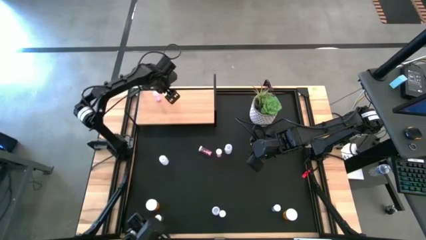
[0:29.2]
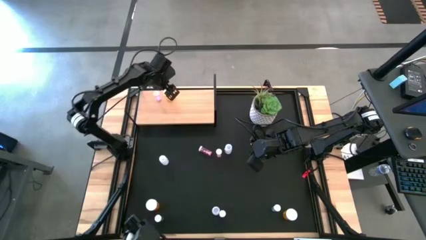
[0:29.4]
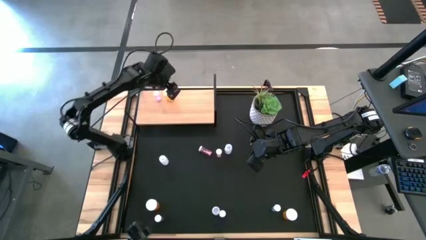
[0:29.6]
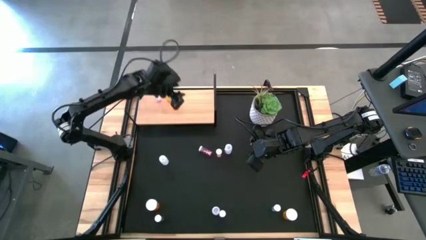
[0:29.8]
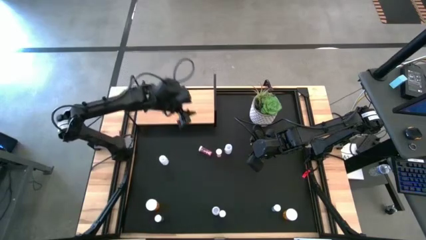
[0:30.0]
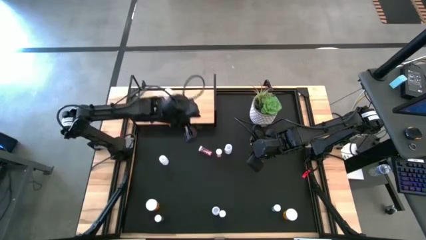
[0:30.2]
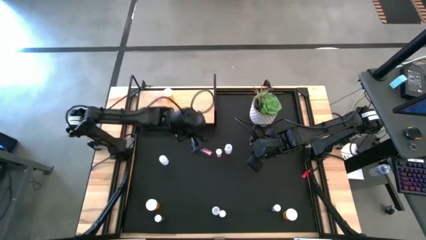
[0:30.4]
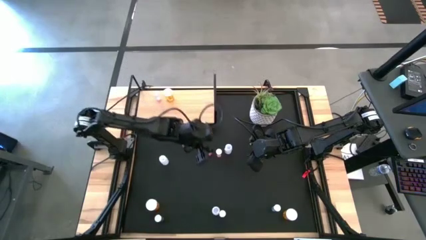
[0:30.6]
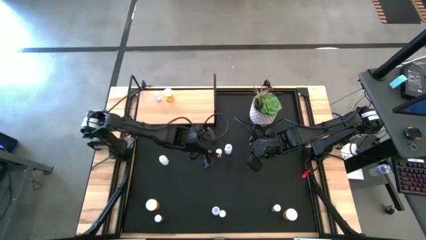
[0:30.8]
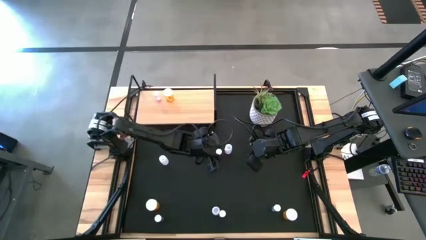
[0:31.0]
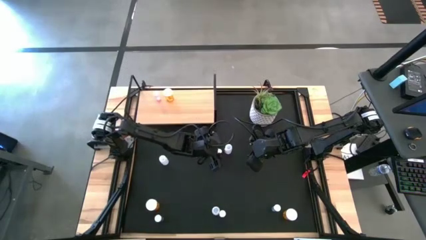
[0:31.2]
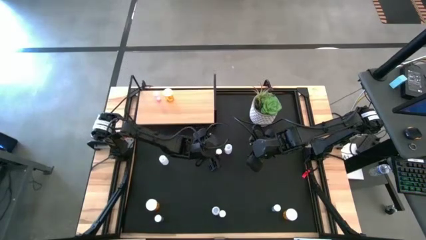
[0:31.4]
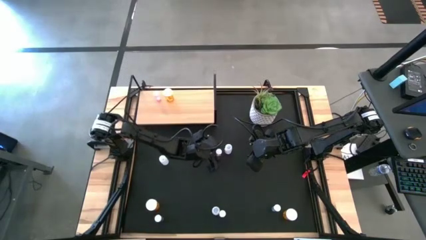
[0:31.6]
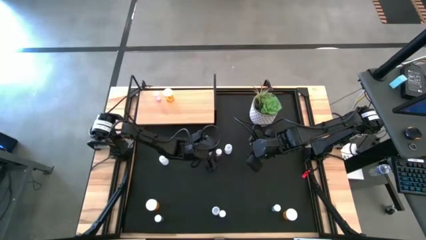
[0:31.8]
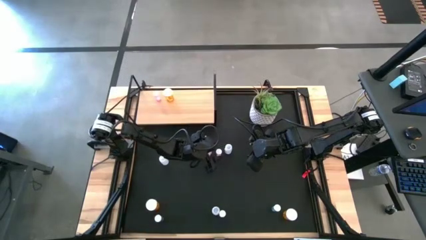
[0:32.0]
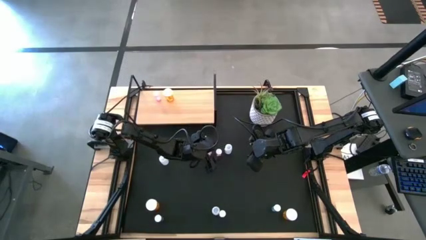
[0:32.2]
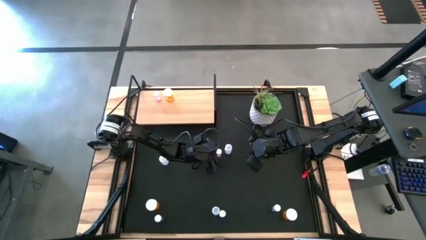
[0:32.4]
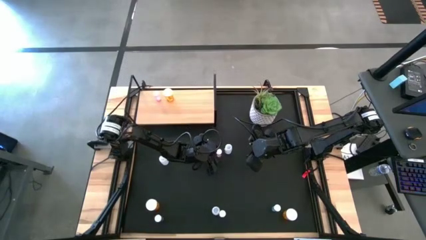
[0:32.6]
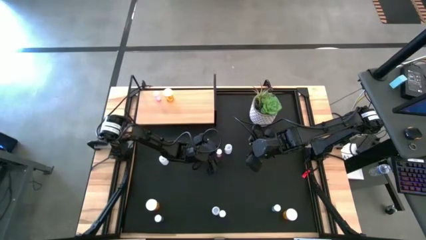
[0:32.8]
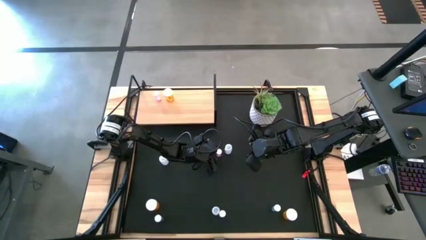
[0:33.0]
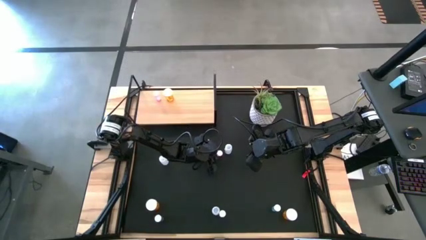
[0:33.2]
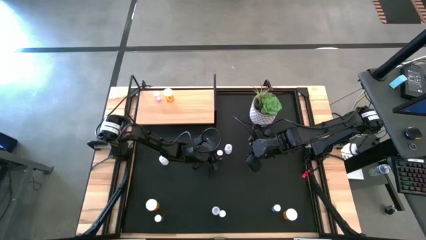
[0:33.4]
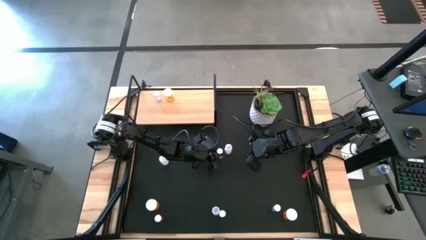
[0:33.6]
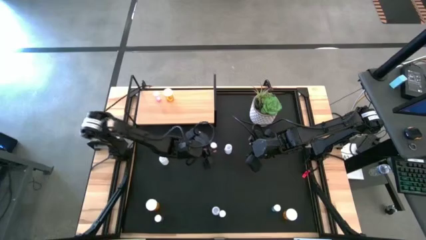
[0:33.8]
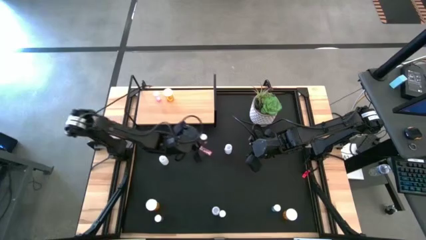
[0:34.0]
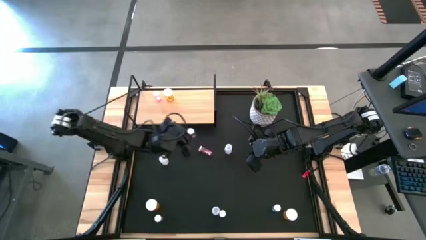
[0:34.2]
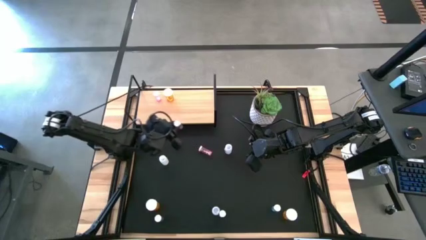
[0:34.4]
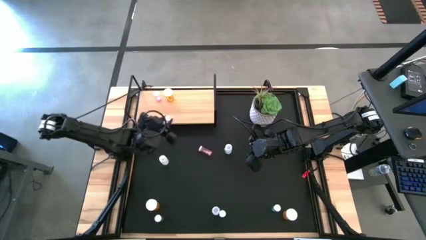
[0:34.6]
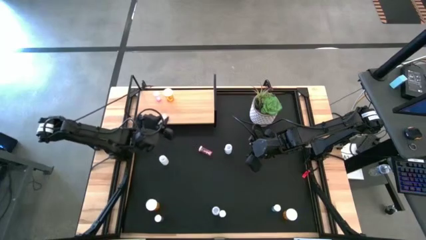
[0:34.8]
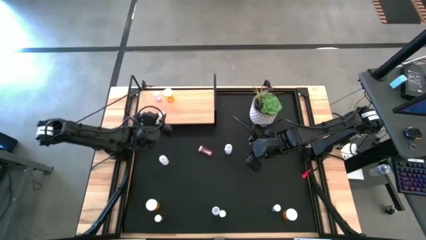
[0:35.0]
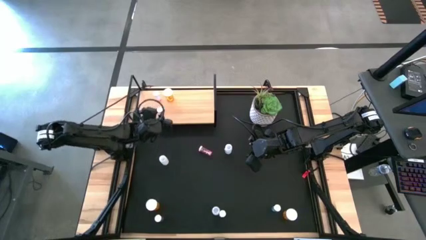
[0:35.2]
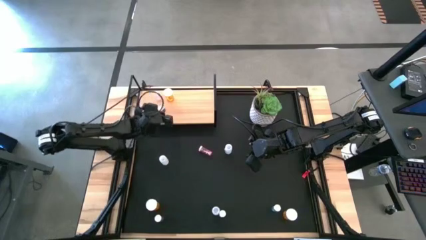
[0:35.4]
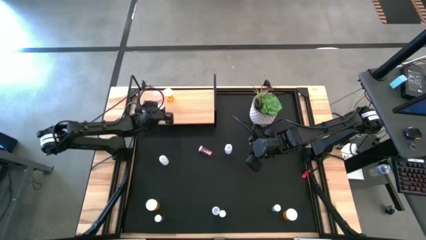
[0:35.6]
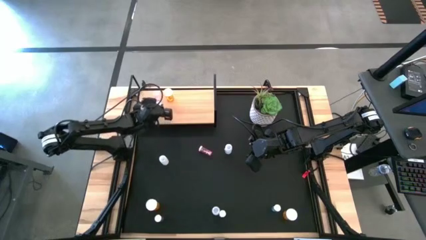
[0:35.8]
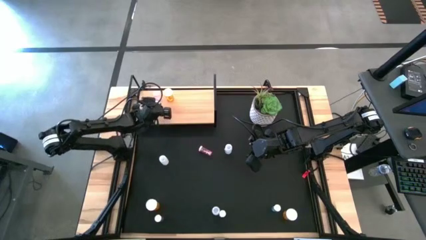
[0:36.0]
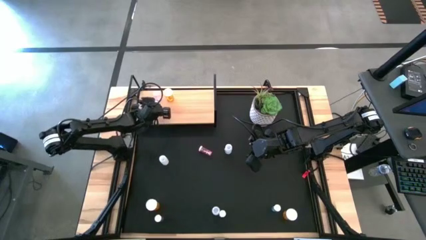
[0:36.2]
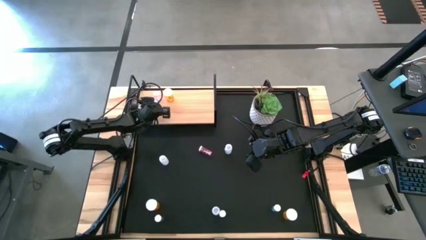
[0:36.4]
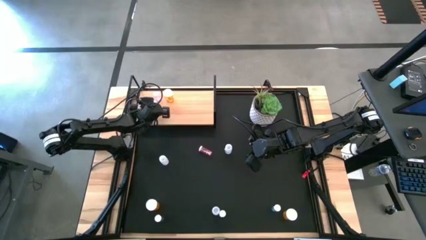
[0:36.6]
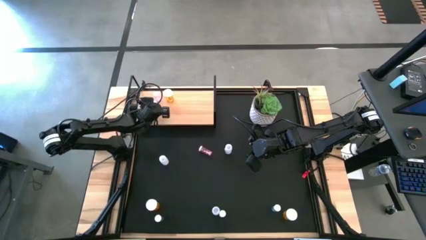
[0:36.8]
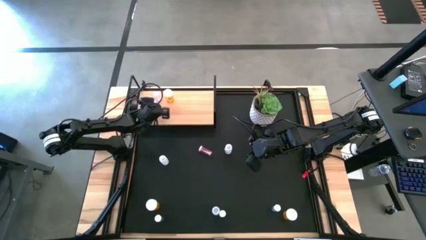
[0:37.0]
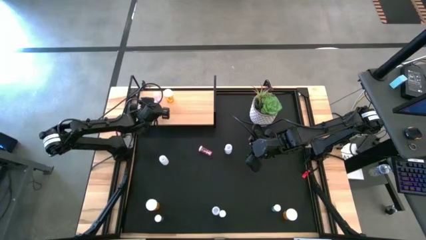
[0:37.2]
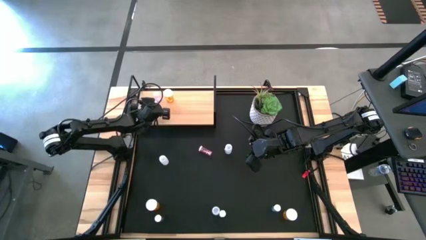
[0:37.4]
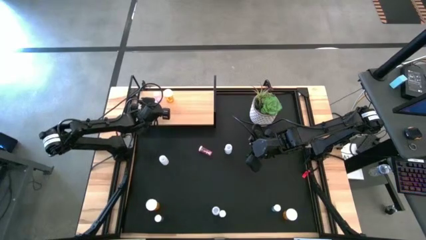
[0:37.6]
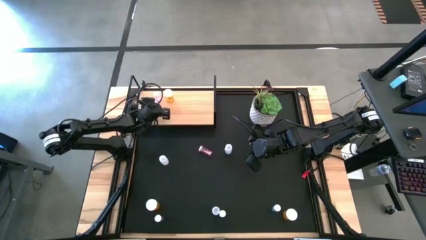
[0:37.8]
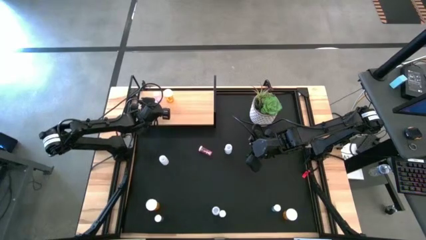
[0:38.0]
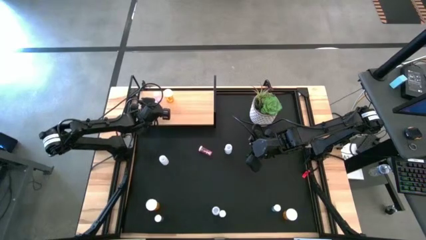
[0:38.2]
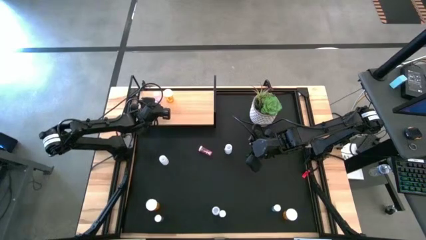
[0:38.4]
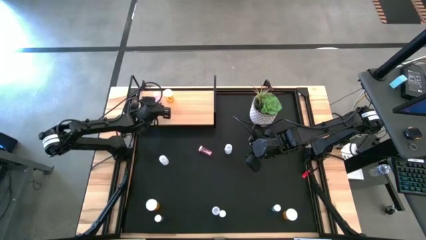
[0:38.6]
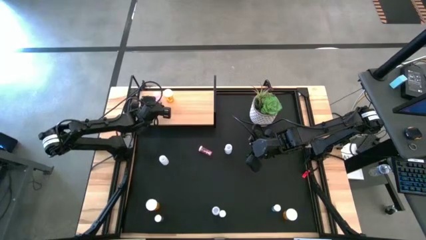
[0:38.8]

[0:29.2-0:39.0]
Task: Pick and place medicine bottles onto shelf by color
Put the right pink pill bottle on the shelf aligned with the other pink pill bottle

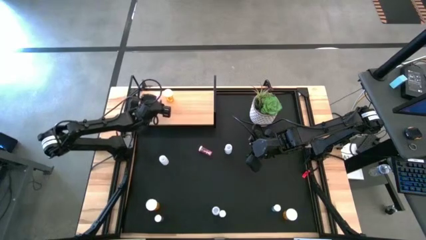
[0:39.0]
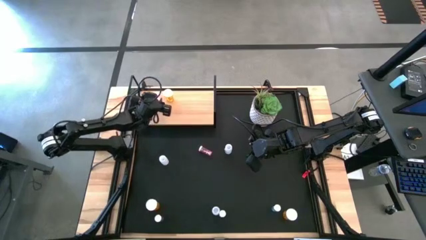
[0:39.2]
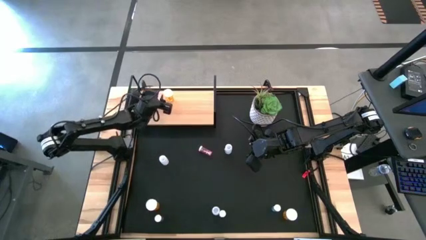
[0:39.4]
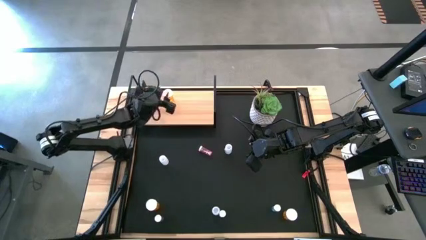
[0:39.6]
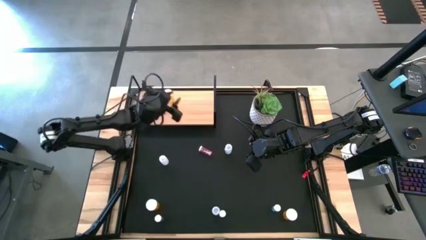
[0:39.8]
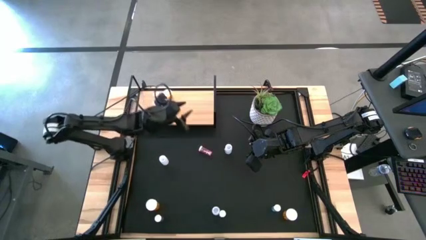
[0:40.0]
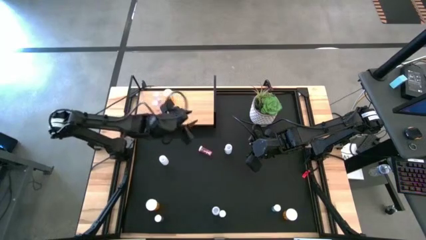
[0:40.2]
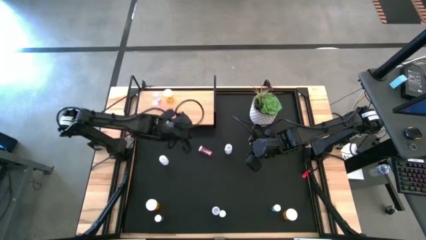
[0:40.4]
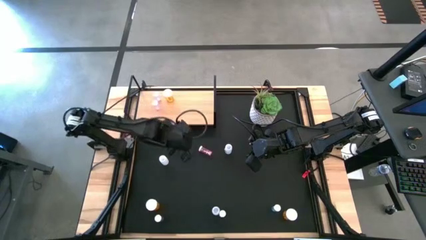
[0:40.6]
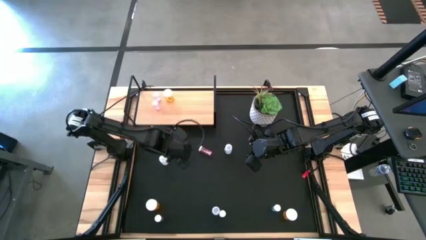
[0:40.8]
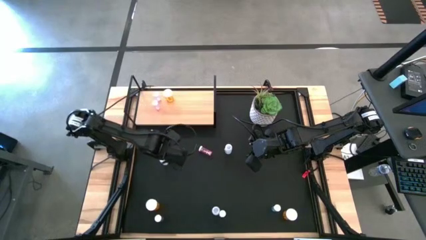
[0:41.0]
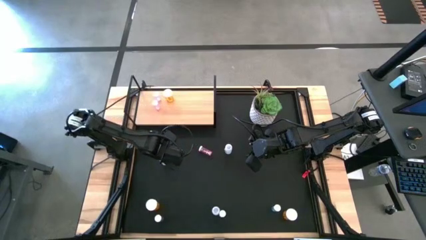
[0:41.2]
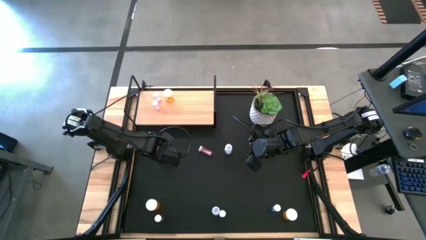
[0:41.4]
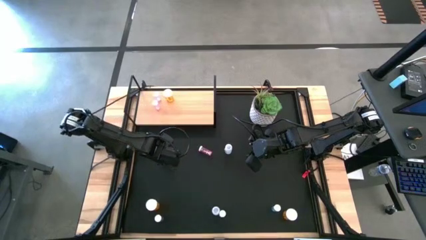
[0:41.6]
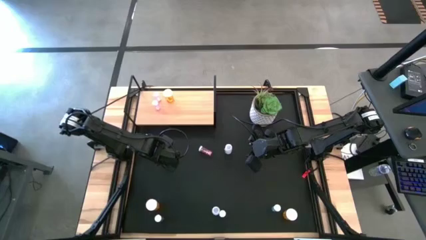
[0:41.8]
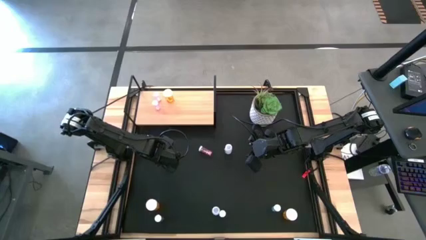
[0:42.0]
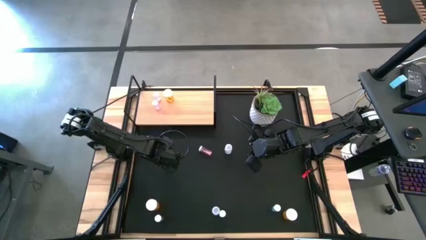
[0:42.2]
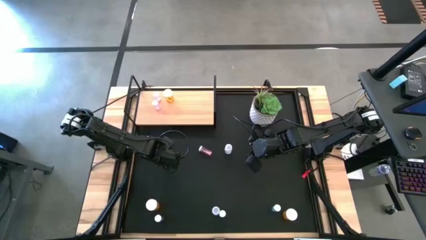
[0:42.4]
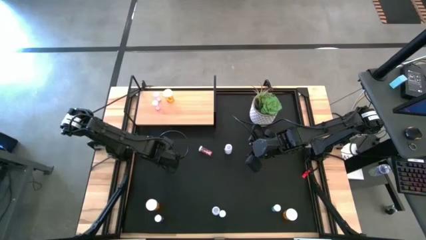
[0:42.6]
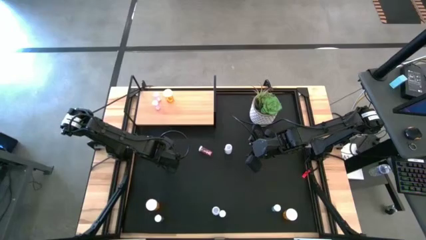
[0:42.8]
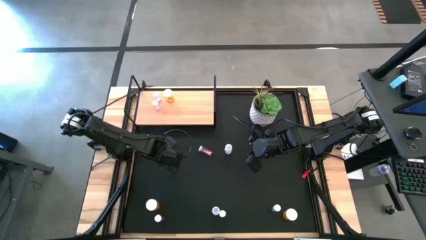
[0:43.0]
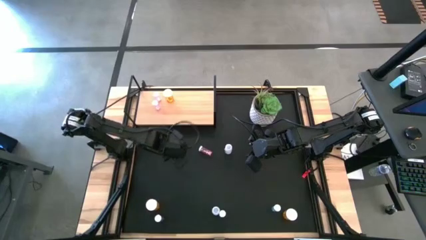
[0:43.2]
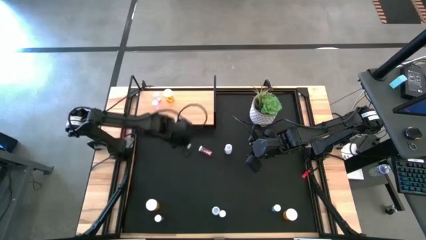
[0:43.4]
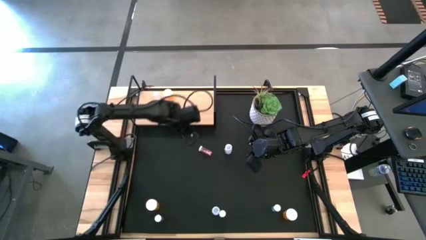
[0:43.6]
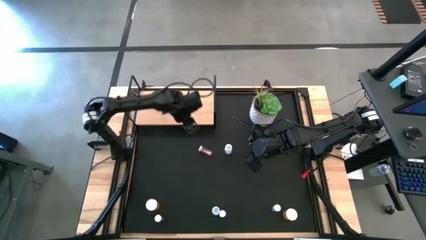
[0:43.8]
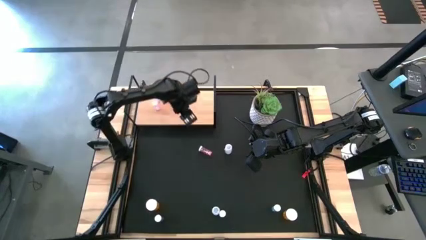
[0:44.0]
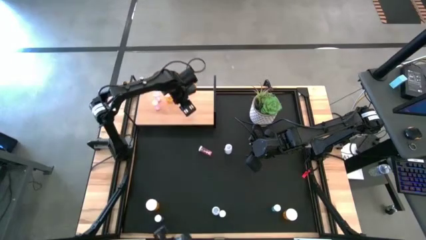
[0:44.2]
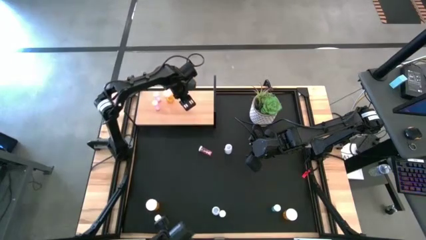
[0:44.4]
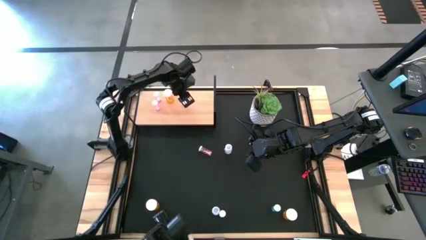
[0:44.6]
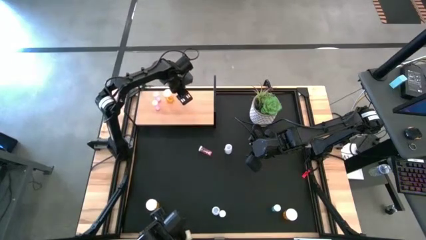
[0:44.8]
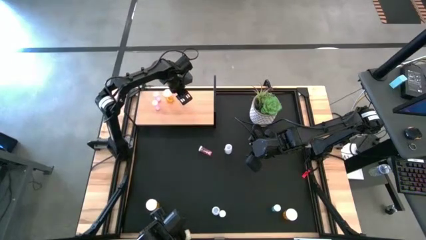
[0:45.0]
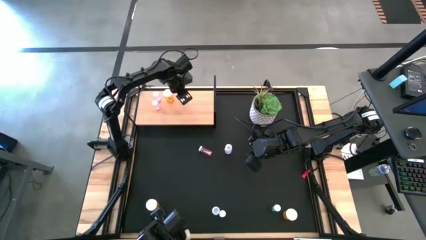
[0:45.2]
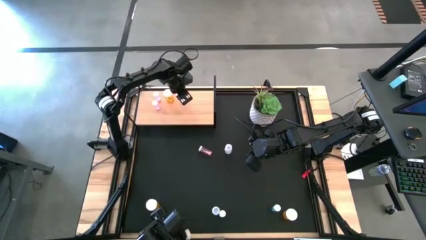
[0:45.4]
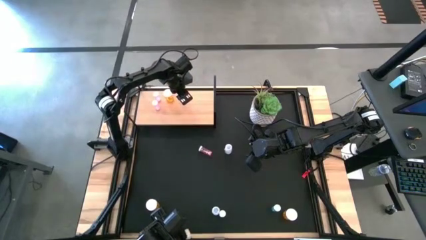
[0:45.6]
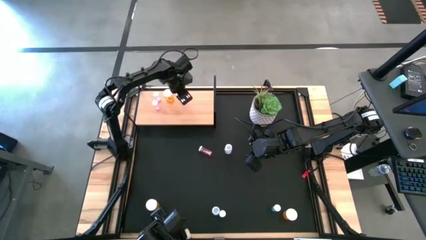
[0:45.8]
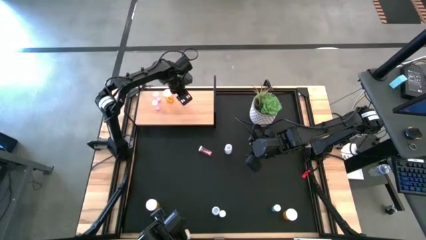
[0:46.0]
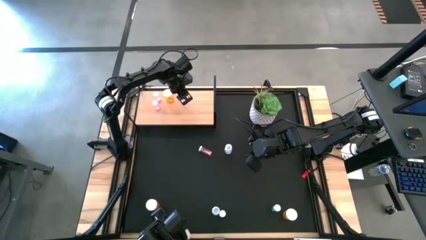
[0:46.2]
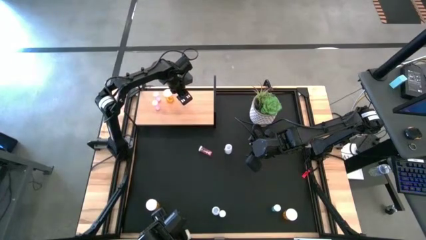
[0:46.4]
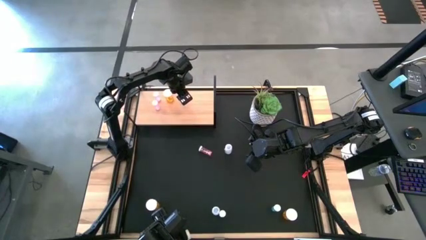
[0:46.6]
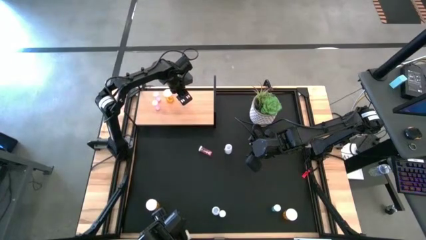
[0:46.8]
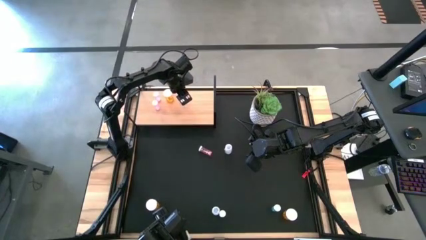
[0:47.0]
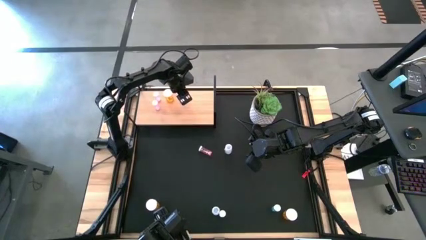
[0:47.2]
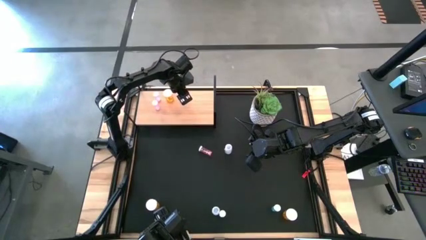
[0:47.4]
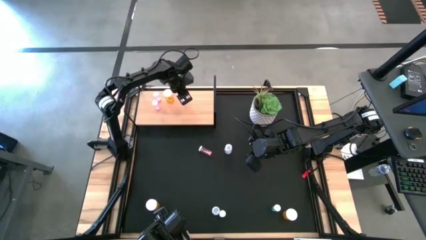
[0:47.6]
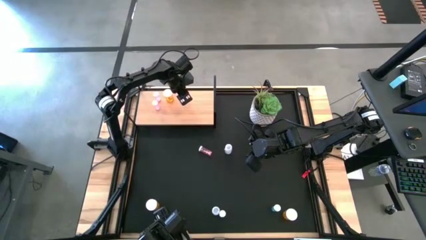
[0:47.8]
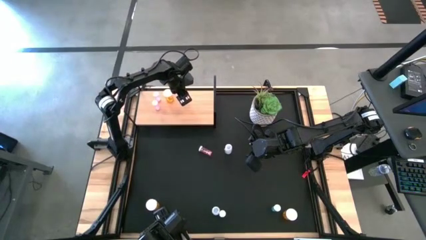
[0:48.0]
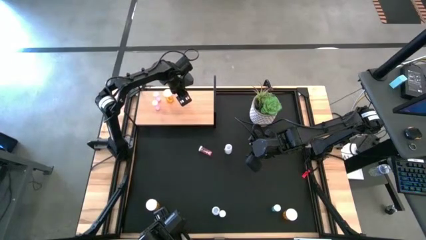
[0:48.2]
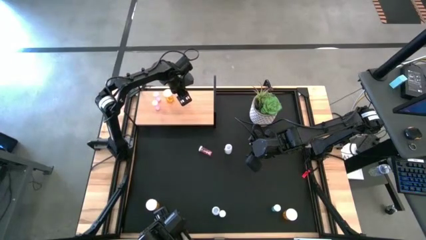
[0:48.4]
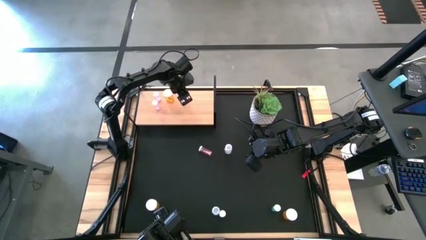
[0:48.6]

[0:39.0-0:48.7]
Put the left white pill bottle on the shelf
